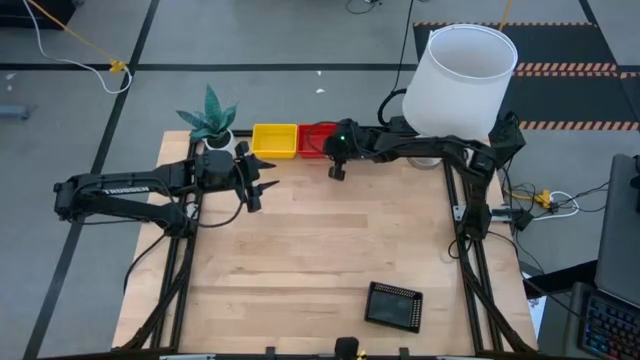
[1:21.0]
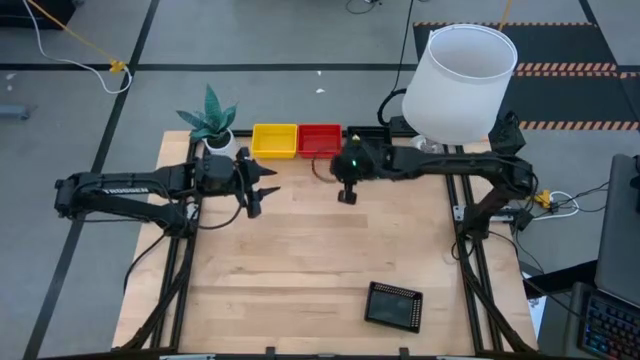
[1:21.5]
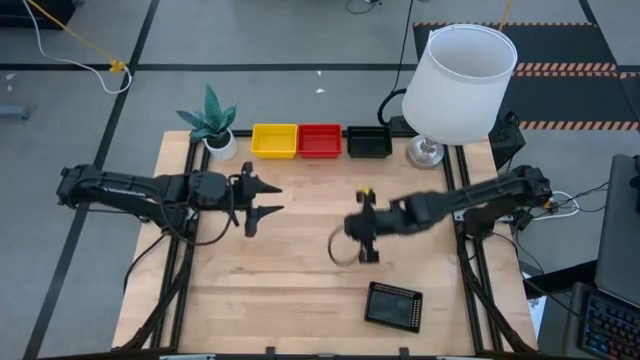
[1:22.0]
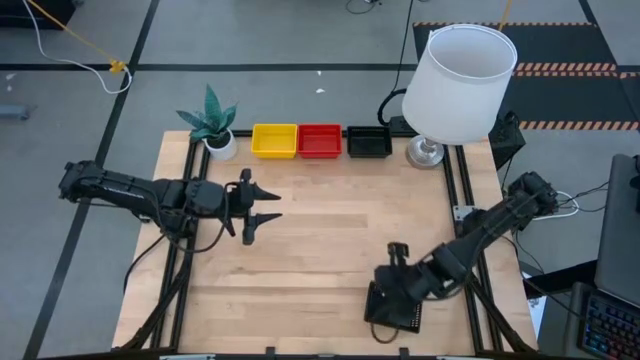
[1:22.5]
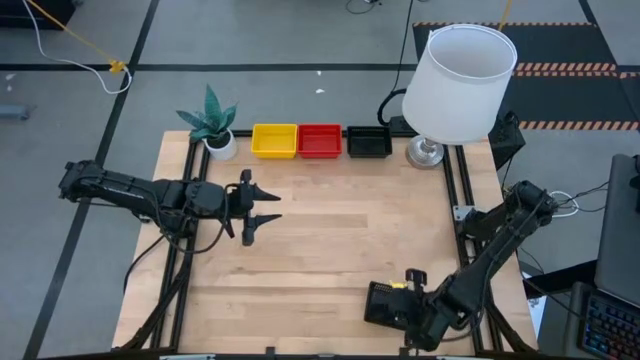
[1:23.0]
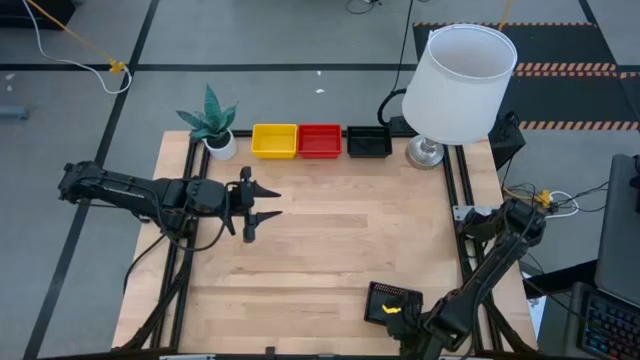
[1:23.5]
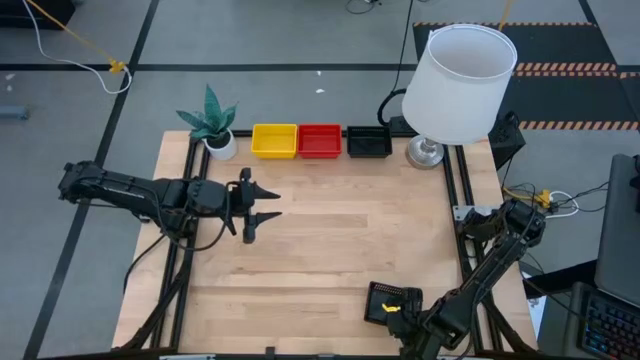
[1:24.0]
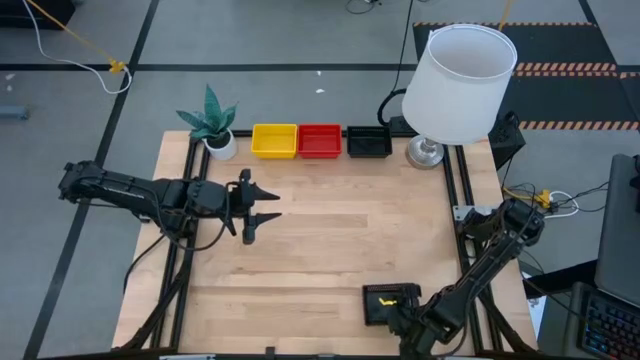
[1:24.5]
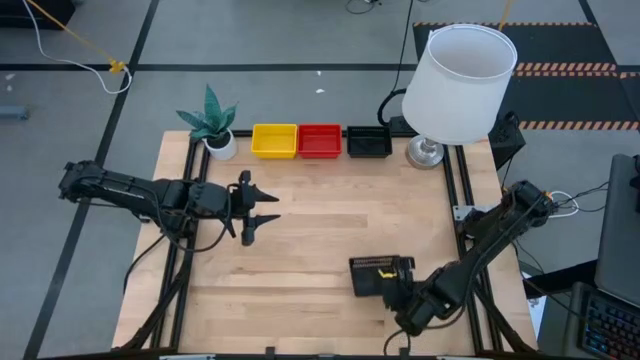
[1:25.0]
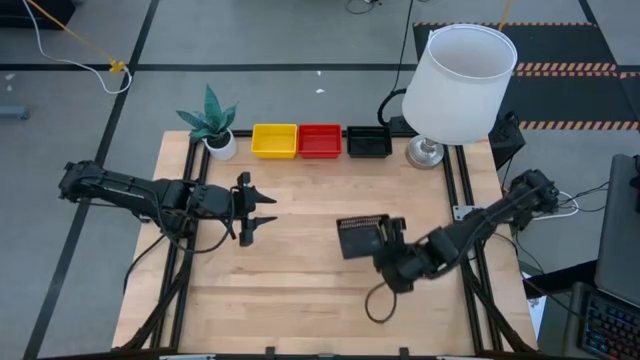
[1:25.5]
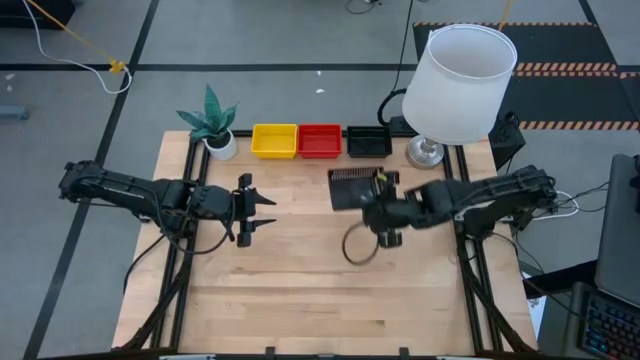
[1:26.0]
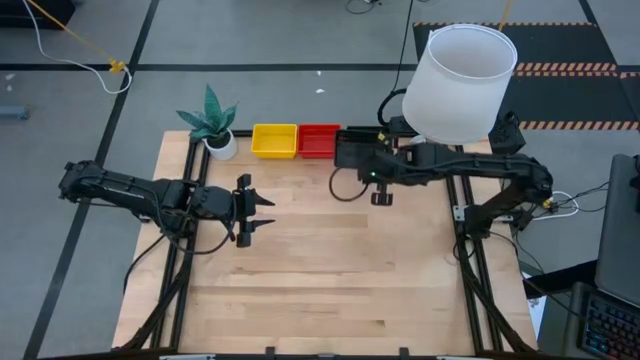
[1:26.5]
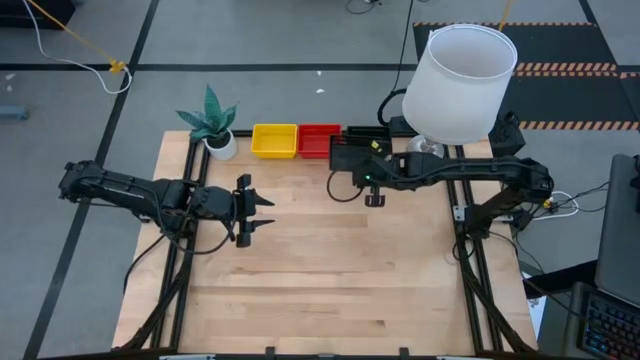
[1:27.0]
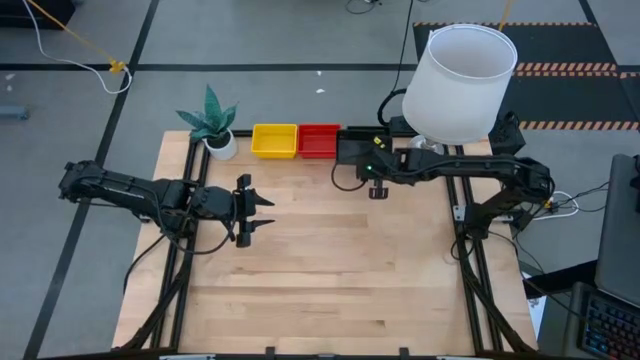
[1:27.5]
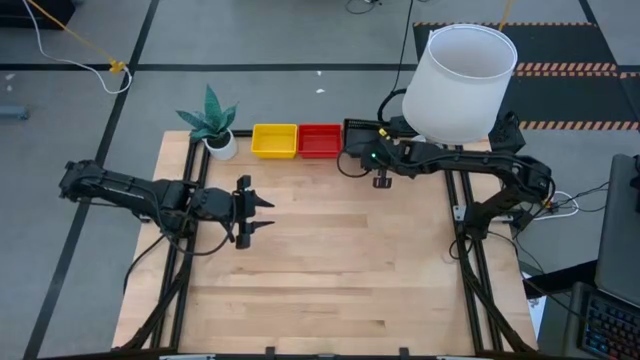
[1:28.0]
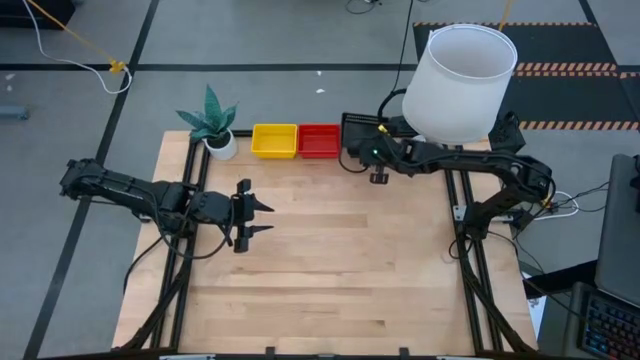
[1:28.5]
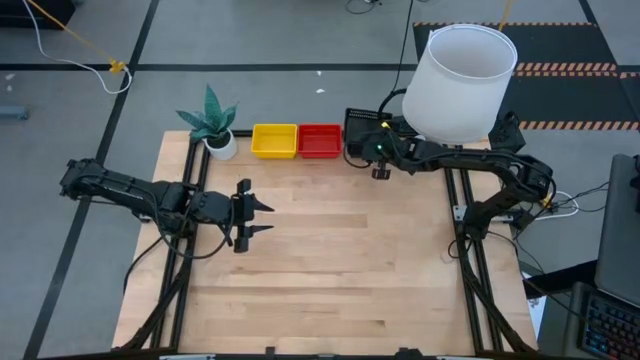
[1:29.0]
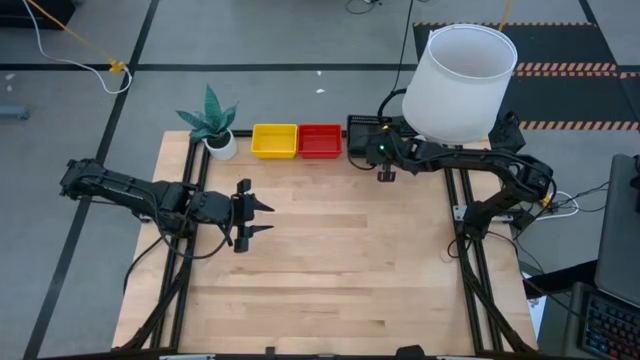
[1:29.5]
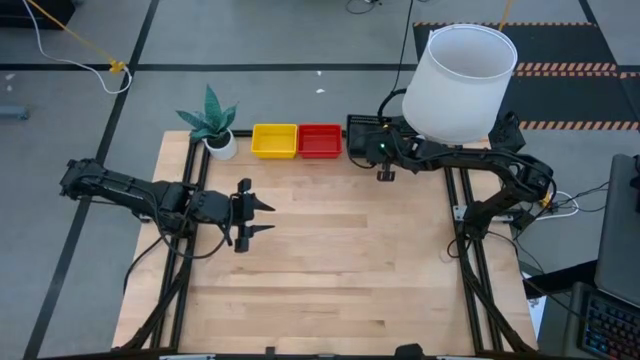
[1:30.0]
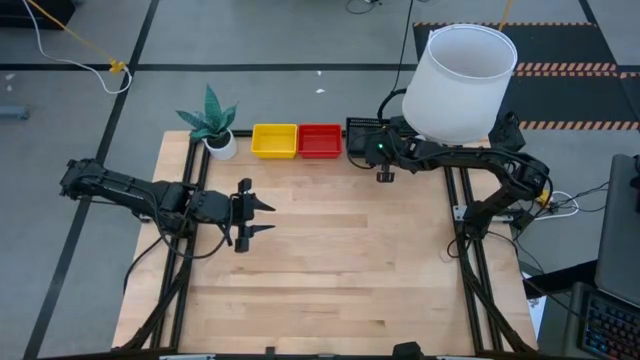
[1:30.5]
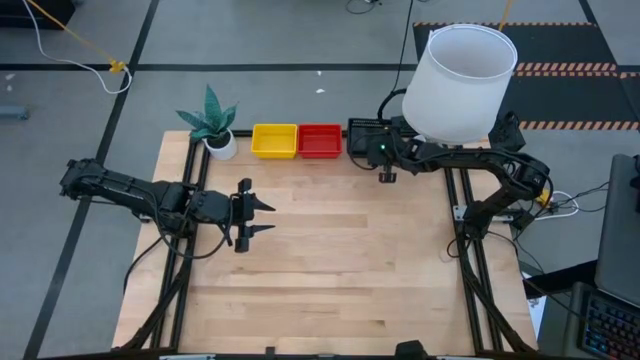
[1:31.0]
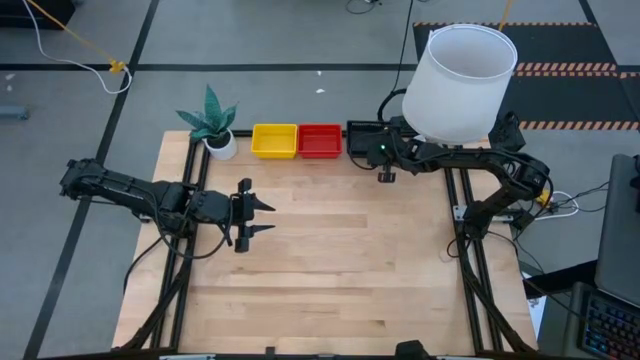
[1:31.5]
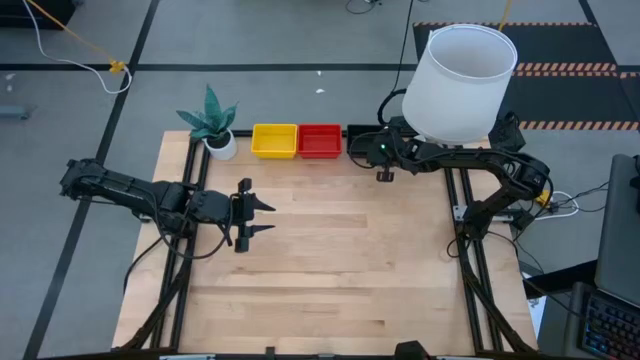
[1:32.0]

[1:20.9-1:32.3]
Stack the bottom black bin on the top stacked black bins

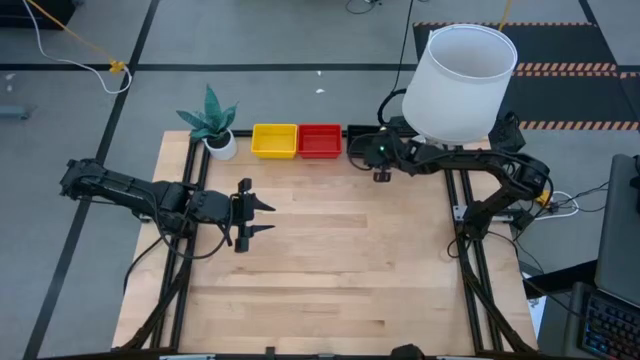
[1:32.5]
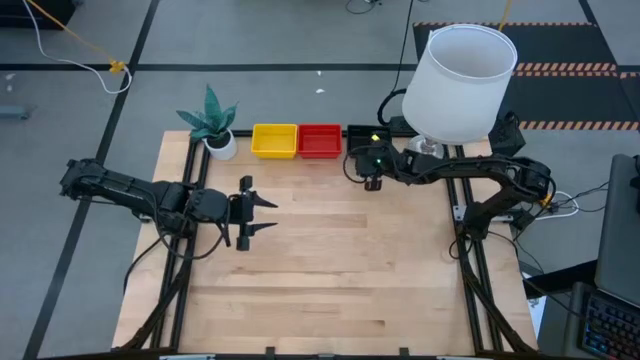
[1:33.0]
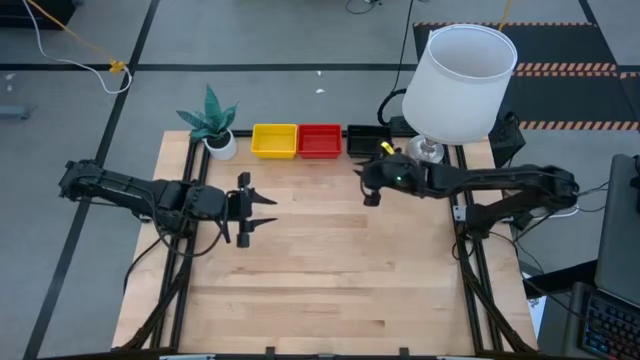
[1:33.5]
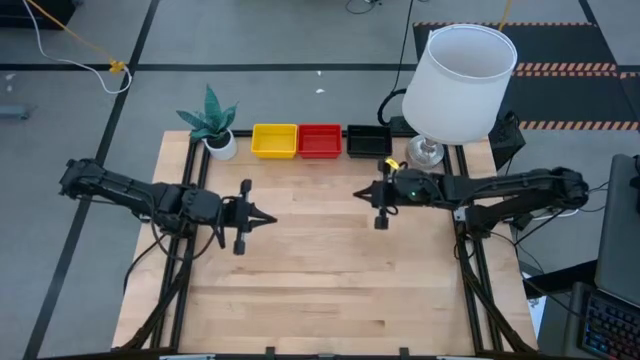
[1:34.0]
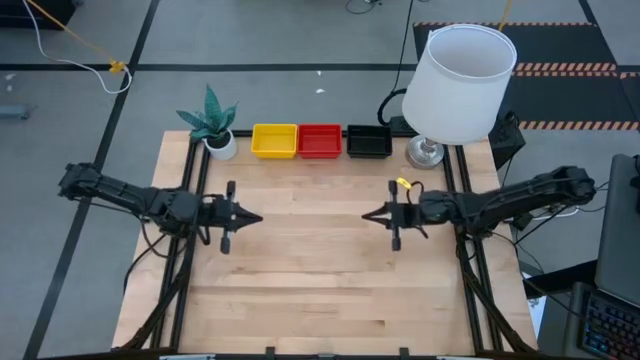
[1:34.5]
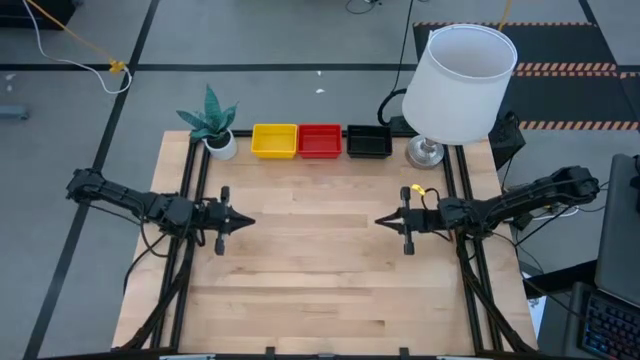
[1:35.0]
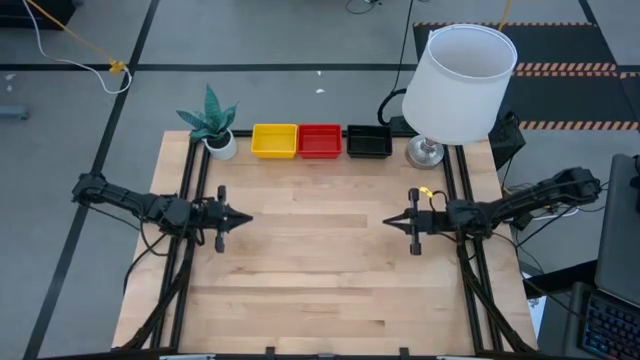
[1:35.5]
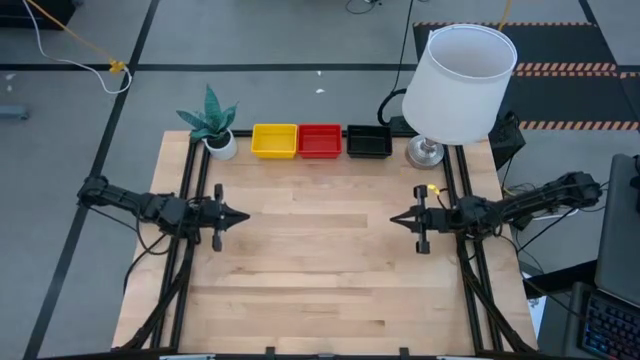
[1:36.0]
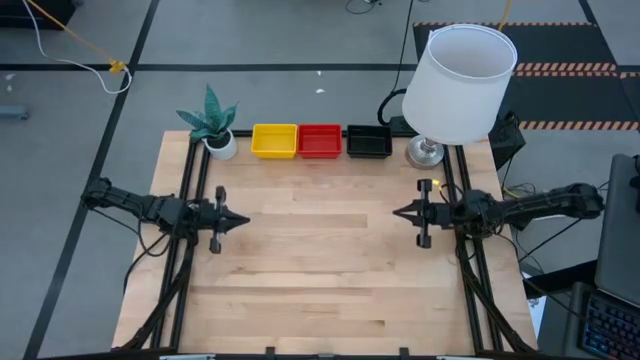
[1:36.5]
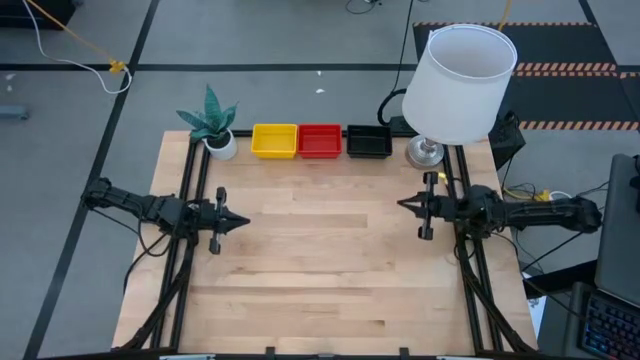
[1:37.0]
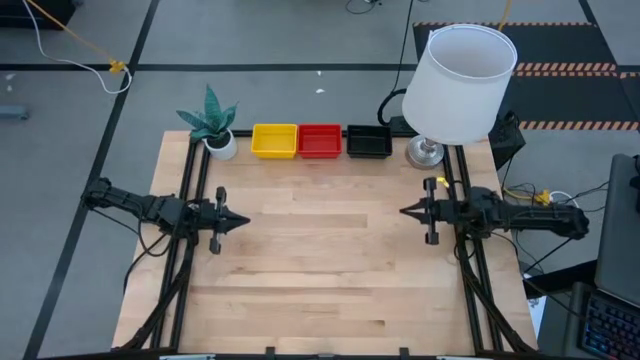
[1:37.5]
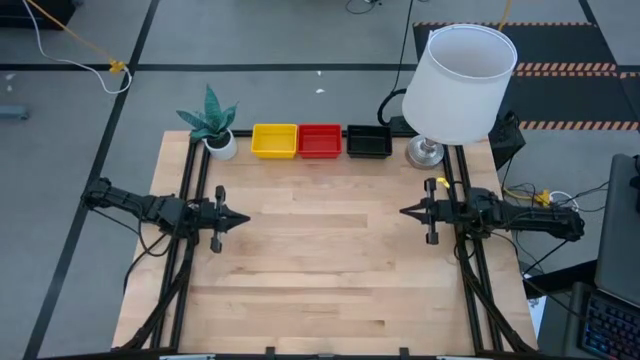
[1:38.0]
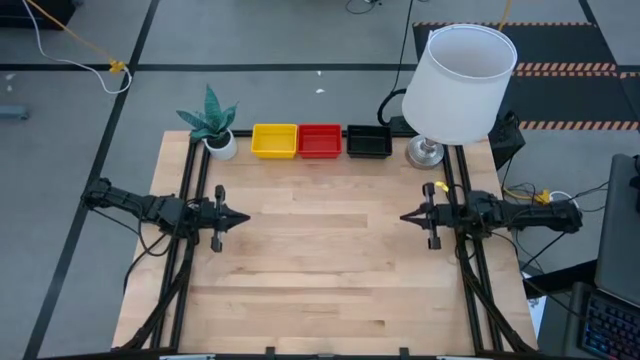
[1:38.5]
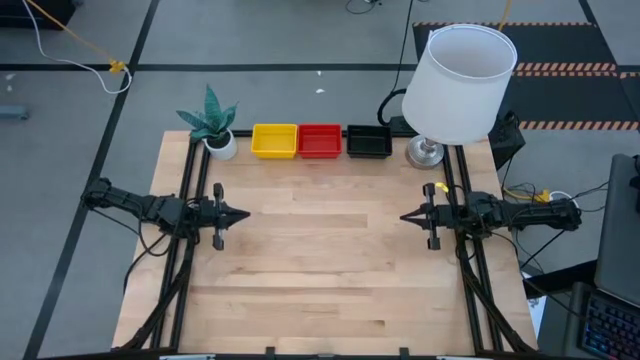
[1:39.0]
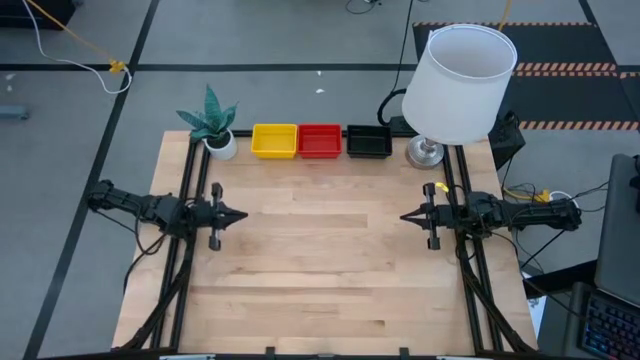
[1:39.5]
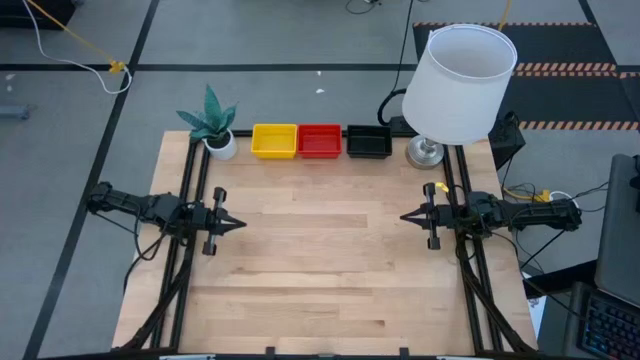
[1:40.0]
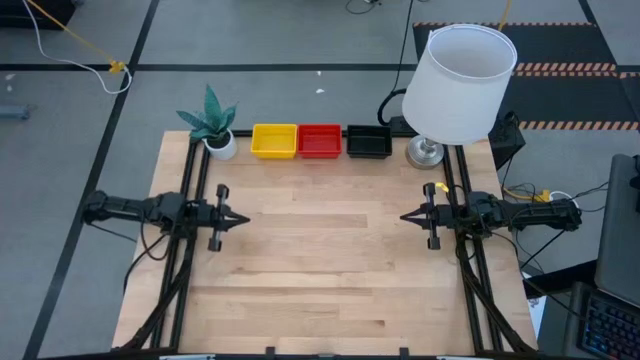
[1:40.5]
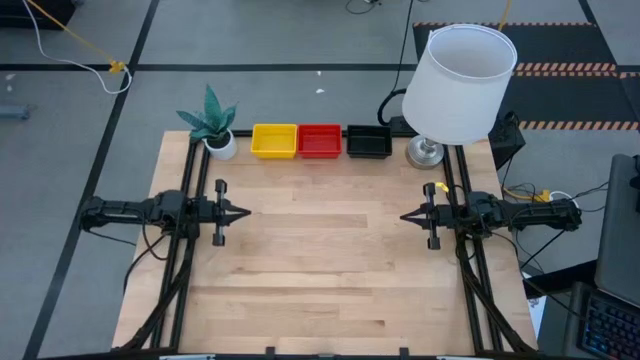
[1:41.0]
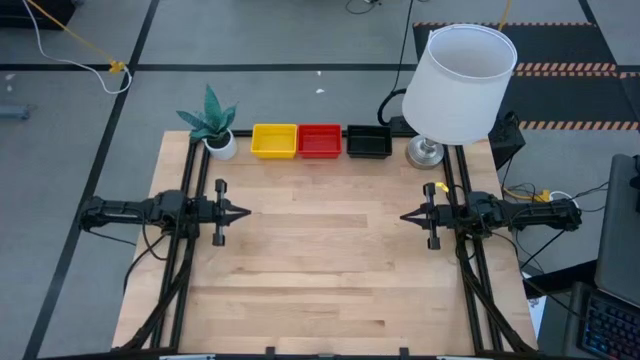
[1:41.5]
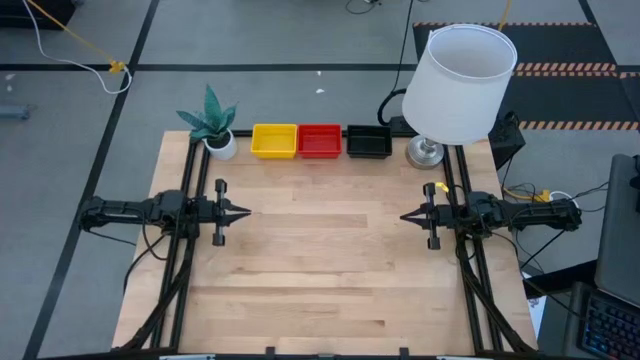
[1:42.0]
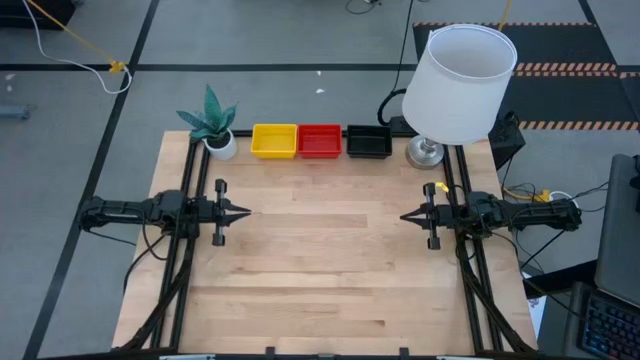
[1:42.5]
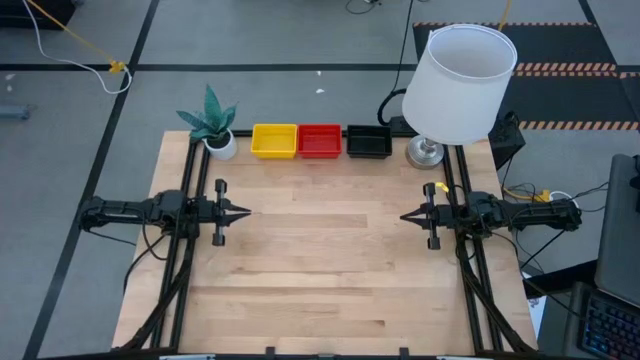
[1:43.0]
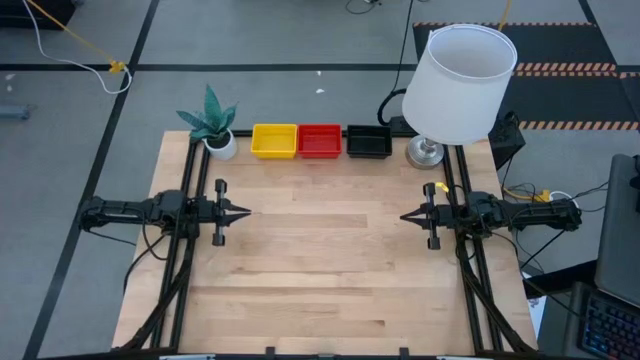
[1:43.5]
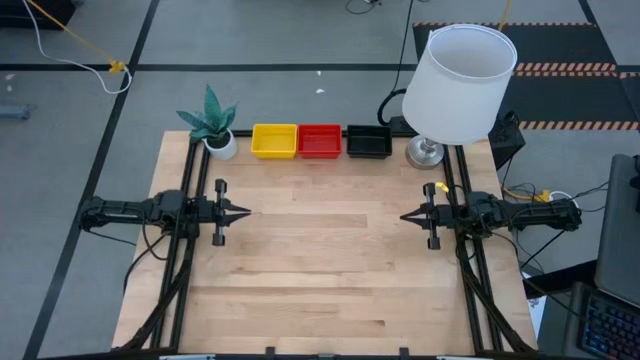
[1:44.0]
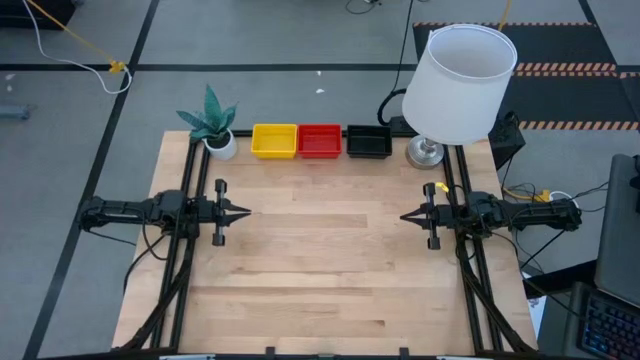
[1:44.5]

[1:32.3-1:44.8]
Return to Home Position
